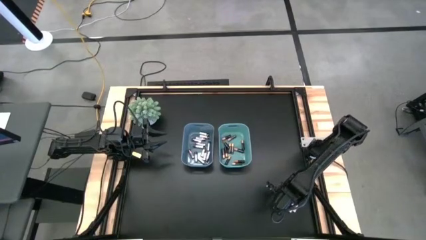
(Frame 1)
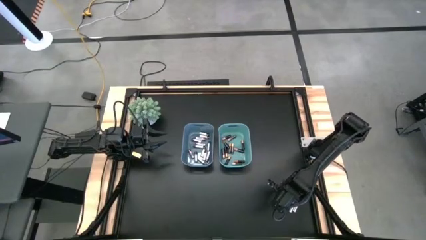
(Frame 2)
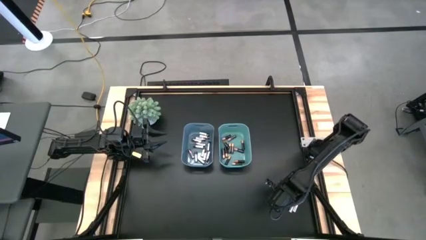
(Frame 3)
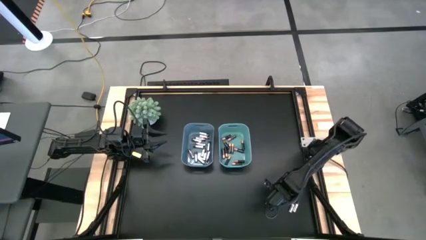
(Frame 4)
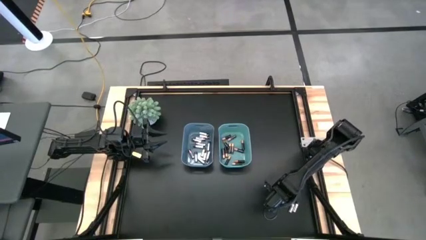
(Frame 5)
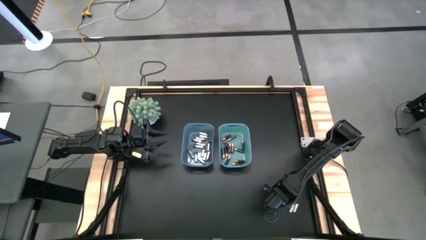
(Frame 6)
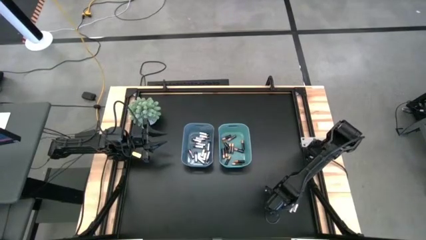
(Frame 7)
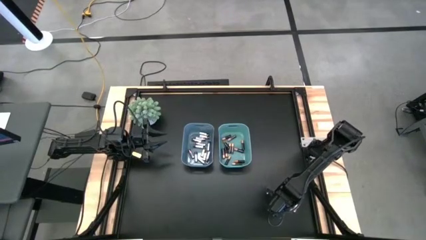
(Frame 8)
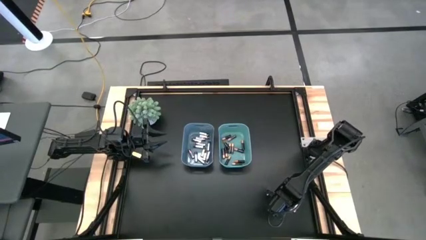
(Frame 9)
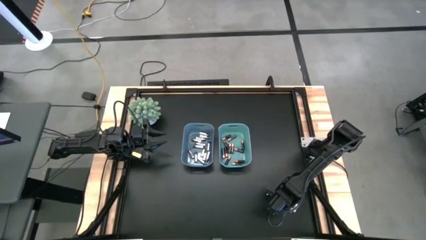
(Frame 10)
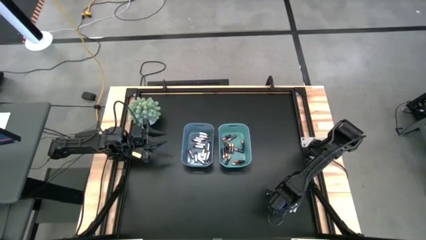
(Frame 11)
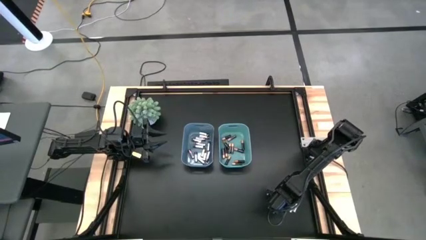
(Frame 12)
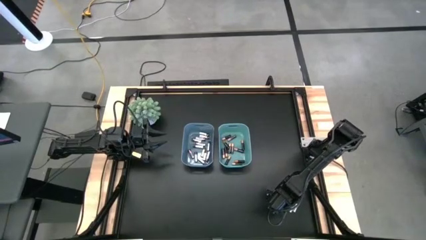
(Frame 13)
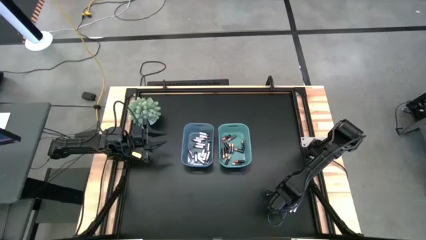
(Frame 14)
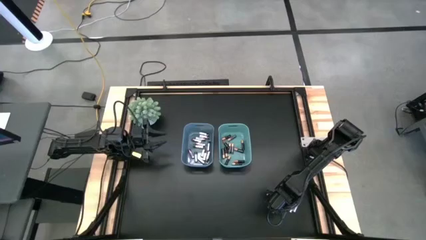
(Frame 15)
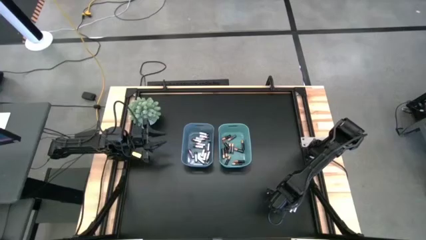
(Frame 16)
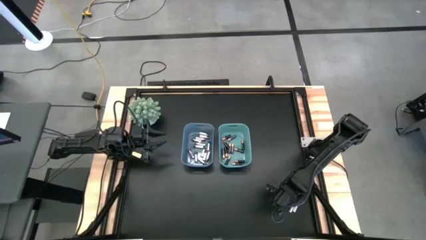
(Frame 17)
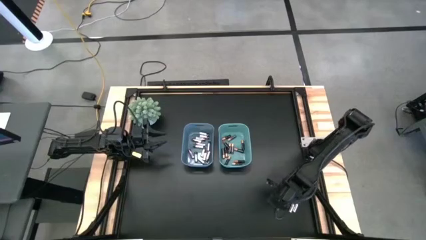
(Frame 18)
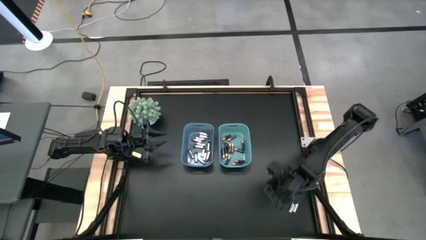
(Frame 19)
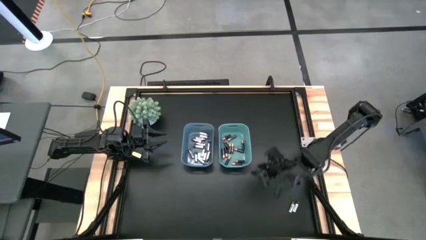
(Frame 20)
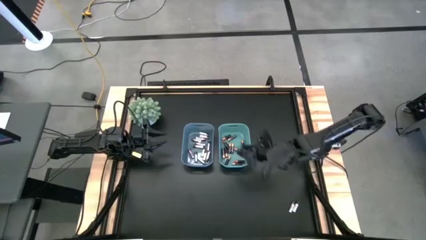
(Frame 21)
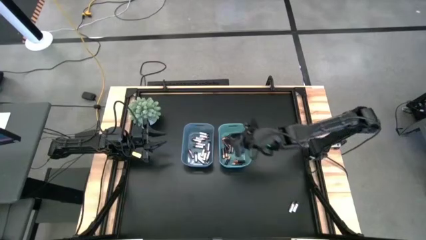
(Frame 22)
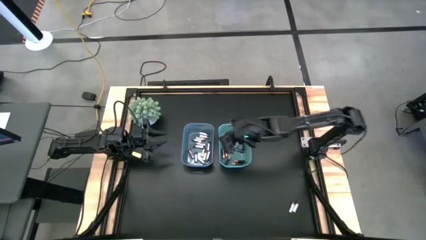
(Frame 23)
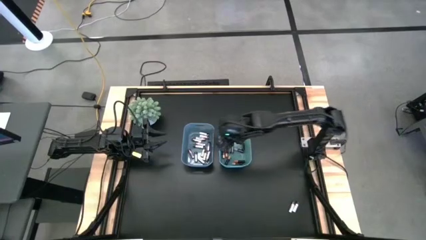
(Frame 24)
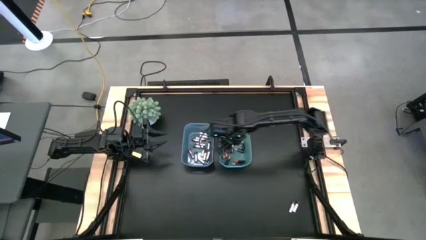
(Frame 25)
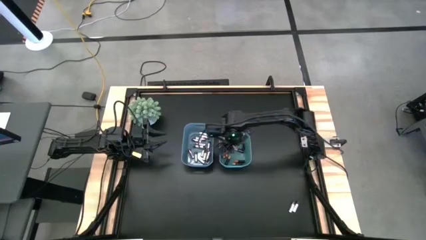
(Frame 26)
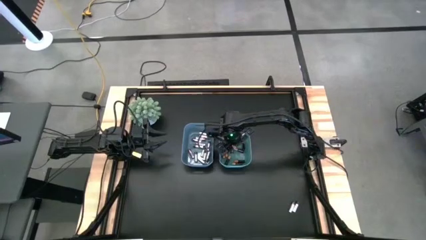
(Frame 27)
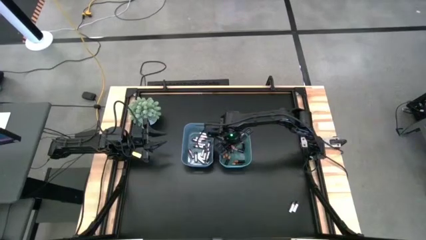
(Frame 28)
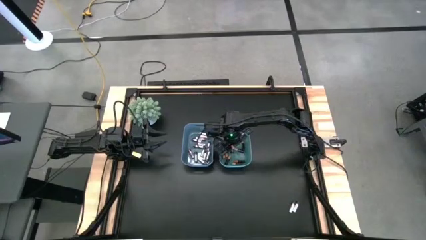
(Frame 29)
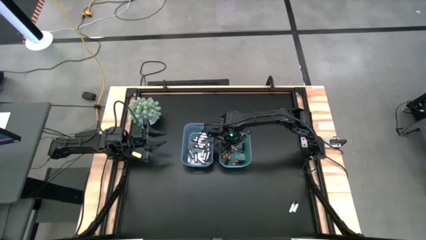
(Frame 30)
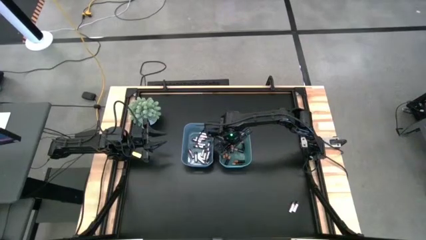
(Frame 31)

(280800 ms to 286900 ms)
Task: Sort batteries
Put the black battery into the green bin

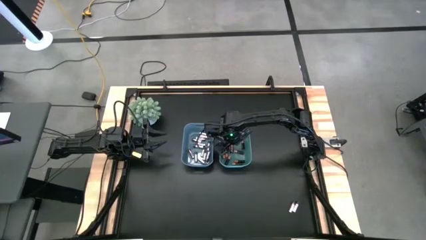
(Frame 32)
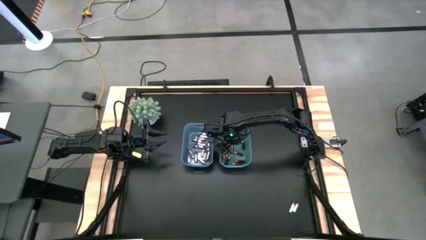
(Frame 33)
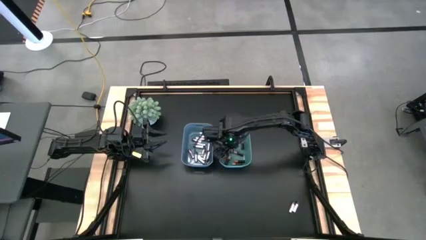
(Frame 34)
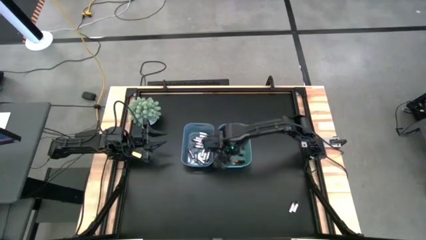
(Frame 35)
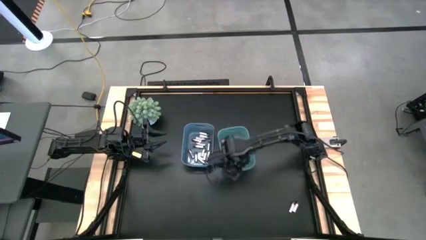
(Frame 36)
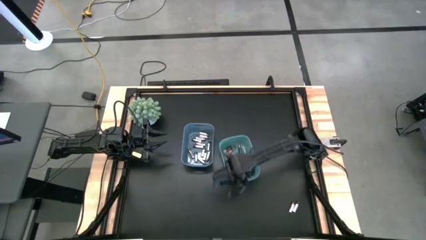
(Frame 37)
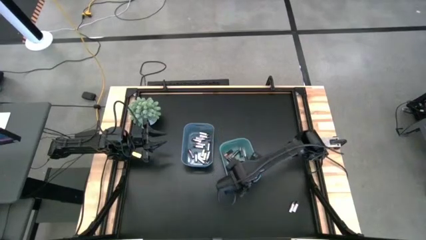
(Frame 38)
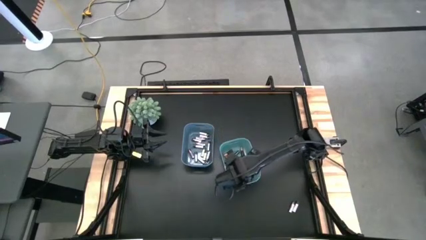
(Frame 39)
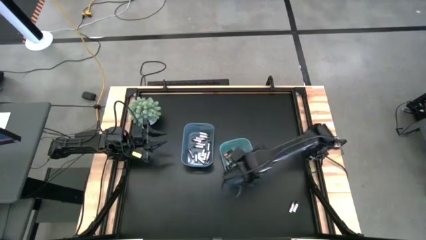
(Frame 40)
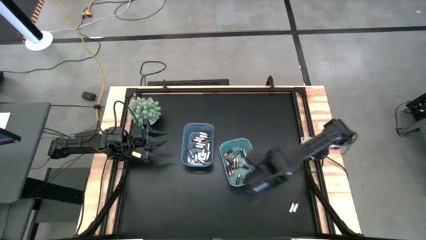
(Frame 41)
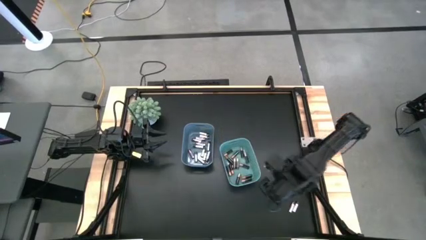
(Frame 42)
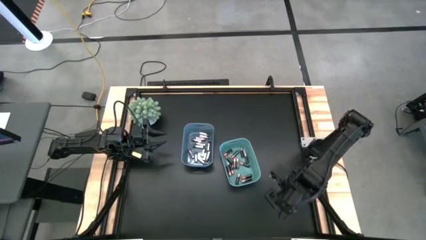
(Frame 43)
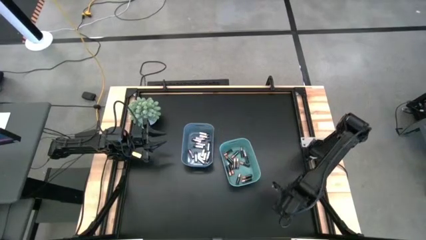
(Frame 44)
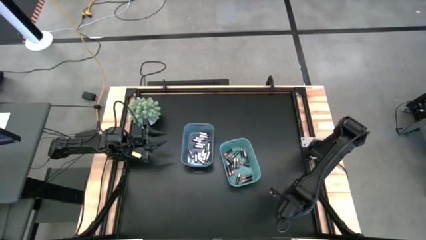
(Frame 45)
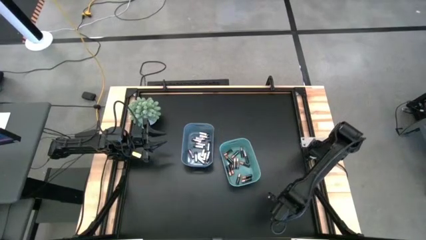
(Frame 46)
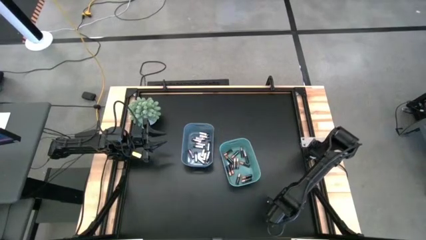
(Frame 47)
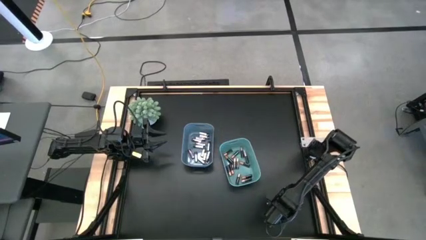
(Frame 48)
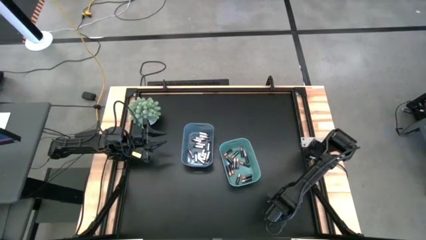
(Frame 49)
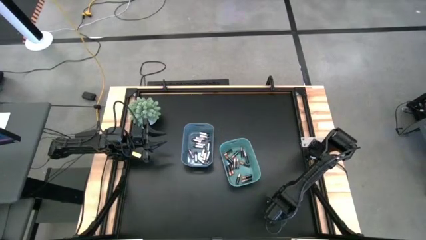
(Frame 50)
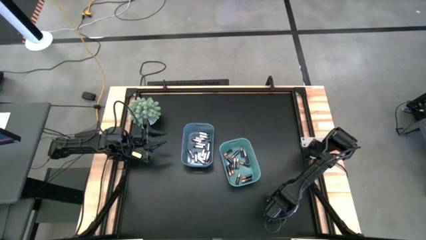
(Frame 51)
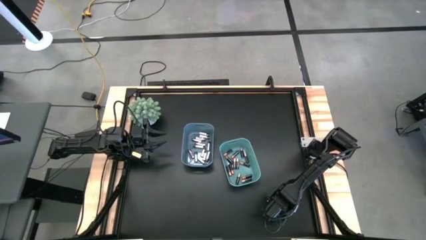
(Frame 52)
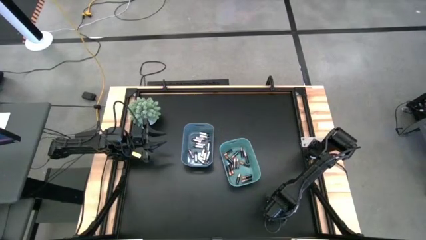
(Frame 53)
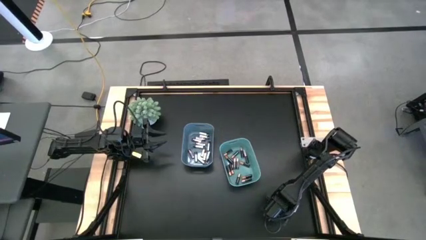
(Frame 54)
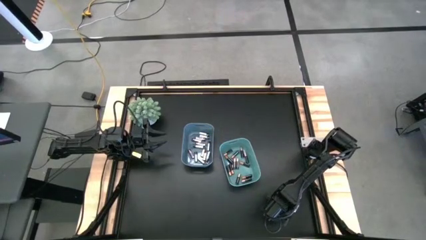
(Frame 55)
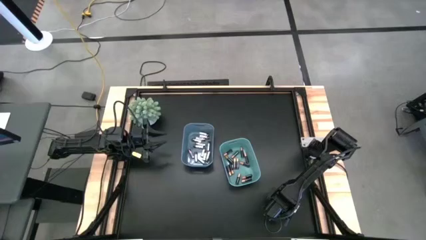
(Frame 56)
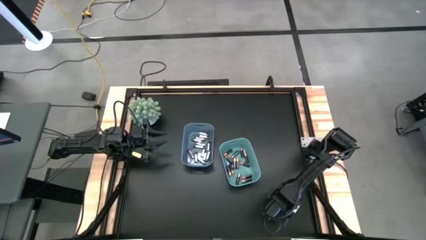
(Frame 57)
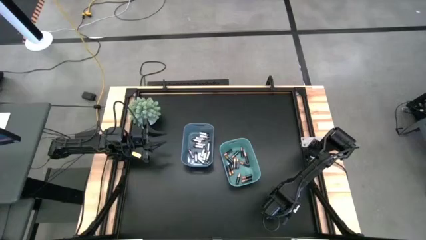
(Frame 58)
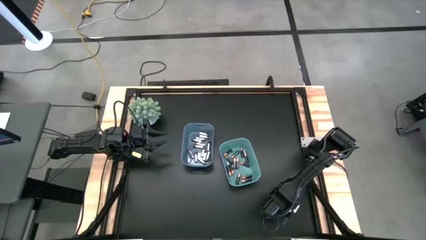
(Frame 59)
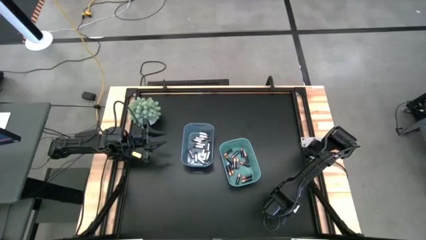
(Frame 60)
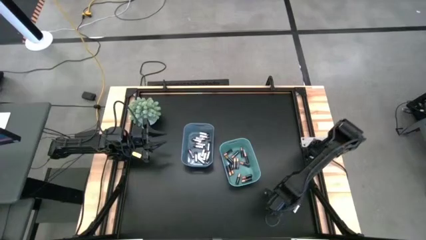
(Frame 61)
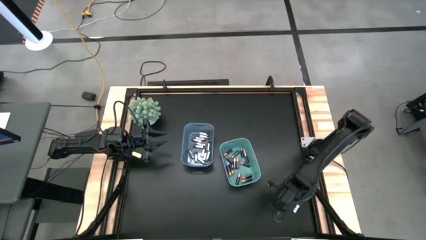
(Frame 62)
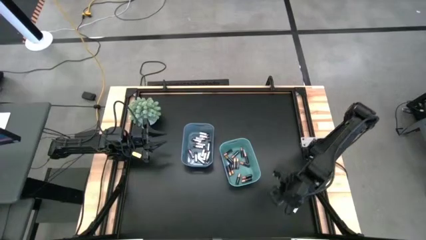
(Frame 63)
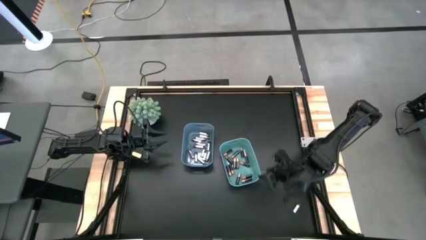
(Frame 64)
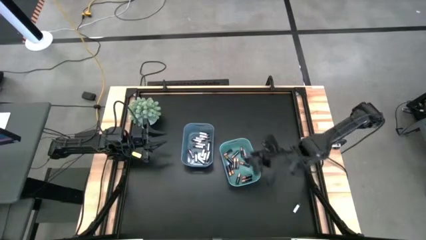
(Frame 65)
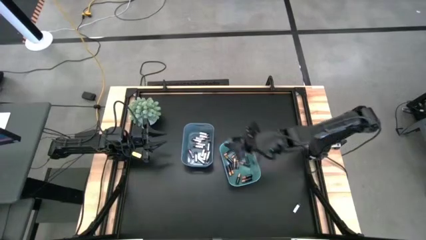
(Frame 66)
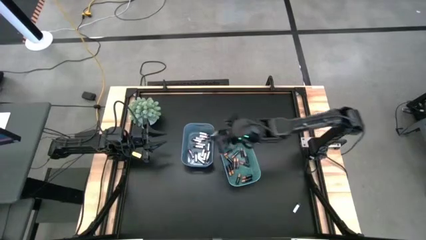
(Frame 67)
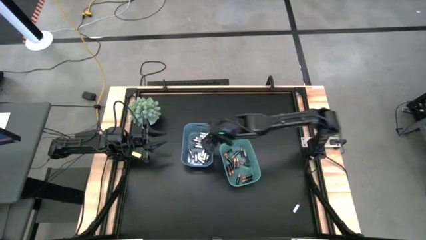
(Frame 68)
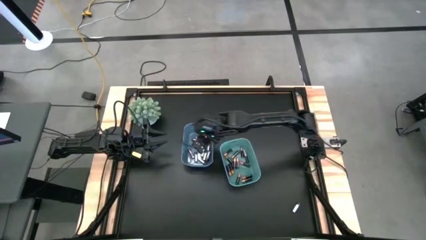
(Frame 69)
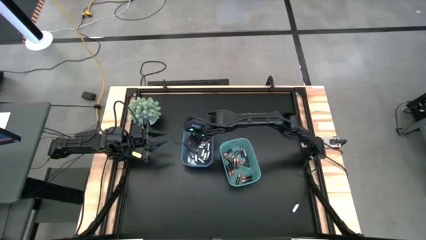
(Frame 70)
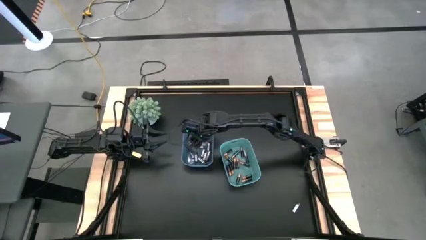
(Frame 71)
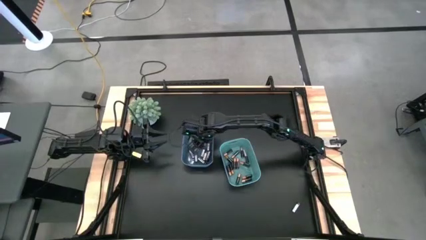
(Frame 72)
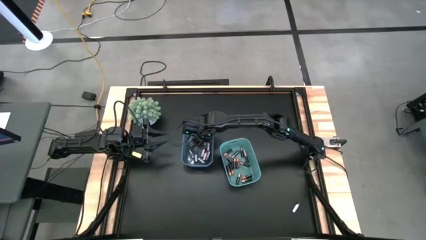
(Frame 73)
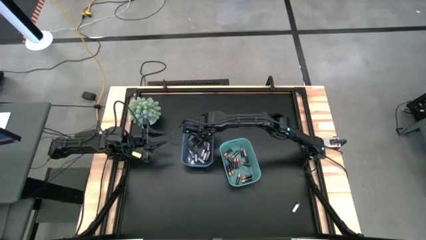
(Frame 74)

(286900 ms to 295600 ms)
Put the silver battery into the blue bin

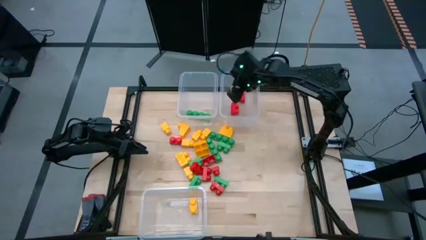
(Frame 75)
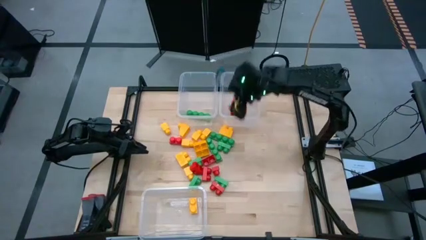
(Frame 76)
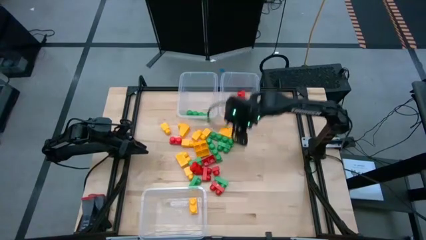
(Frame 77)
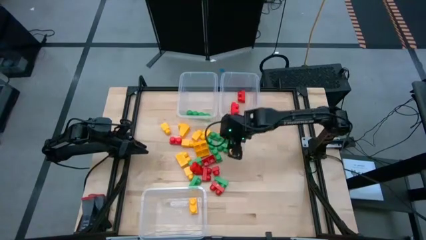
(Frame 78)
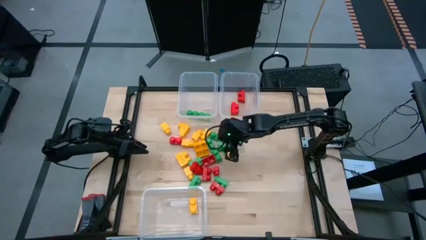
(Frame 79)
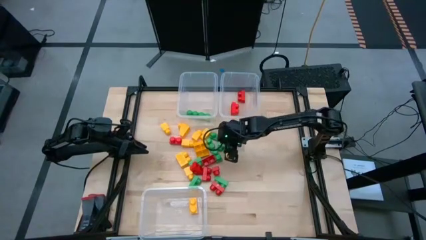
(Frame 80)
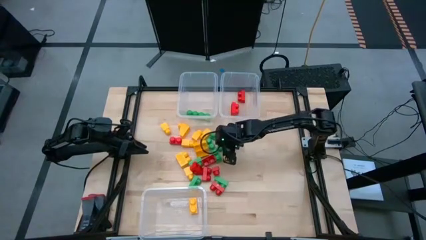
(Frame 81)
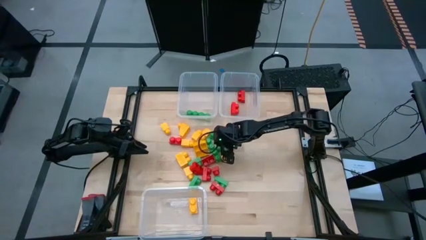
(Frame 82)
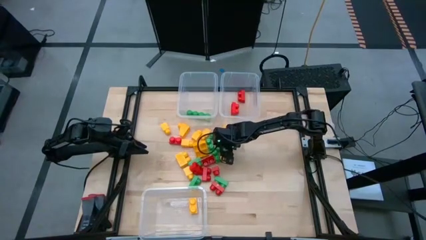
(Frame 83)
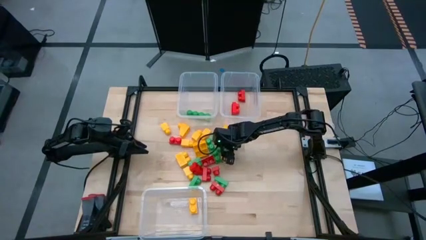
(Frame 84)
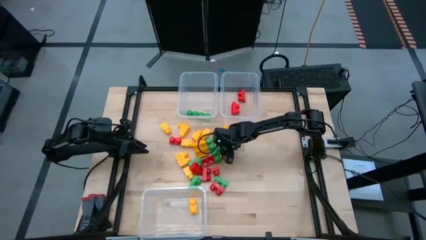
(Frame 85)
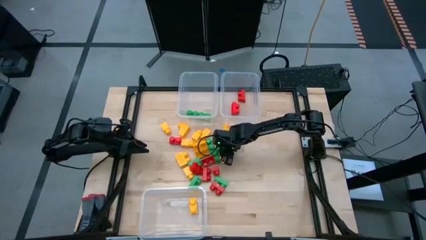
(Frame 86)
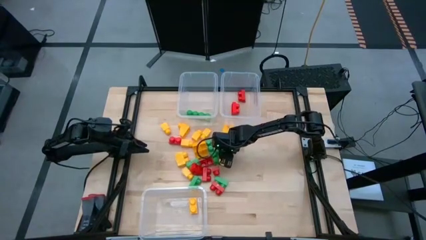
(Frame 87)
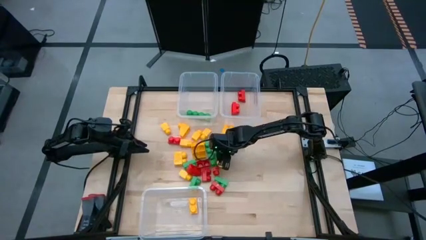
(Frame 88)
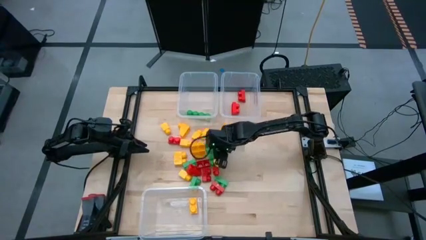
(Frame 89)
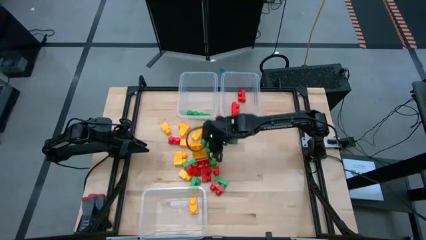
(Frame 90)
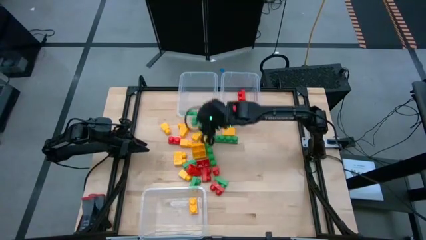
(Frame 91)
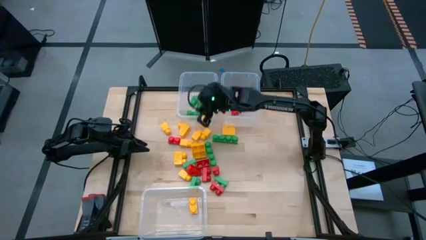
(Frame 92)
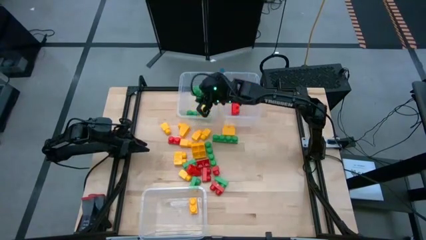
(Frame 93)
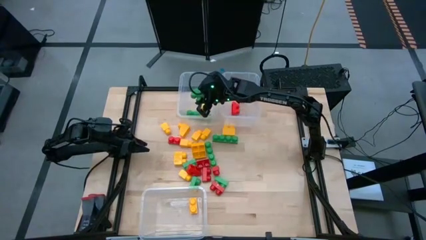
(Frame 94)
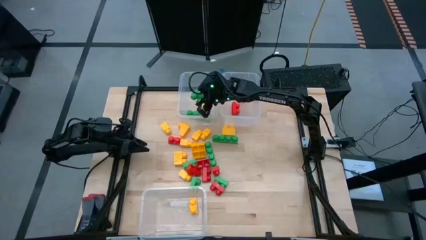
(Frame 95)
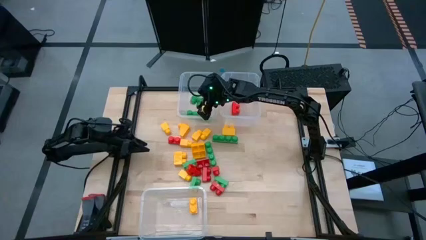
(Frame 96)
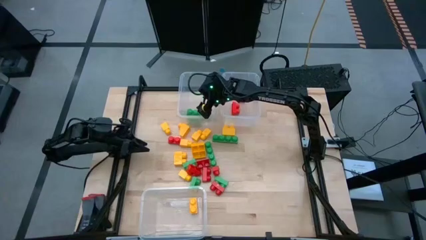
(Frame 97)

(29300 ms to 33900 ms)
Task: Sort blocks
Put the green game piece into the top left transparent bin
